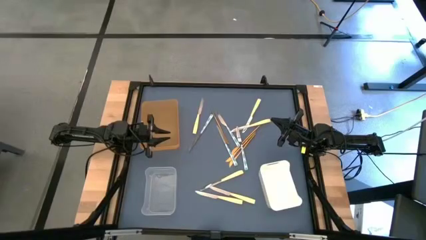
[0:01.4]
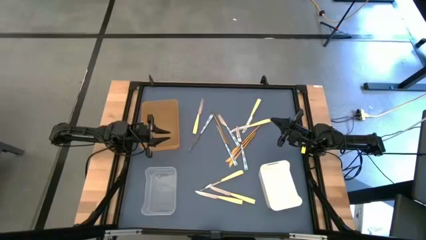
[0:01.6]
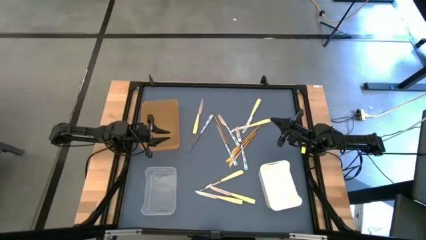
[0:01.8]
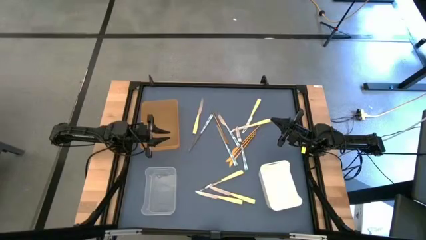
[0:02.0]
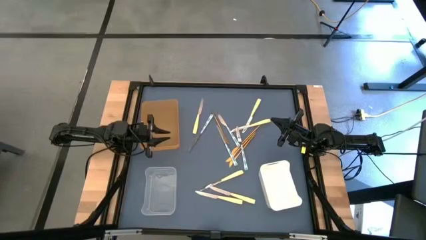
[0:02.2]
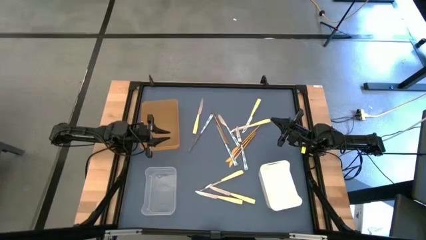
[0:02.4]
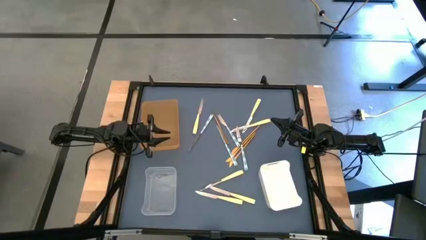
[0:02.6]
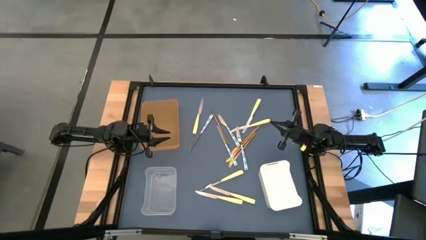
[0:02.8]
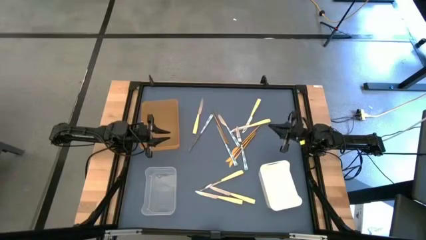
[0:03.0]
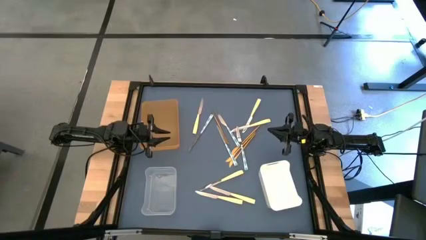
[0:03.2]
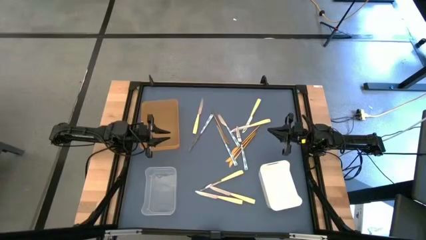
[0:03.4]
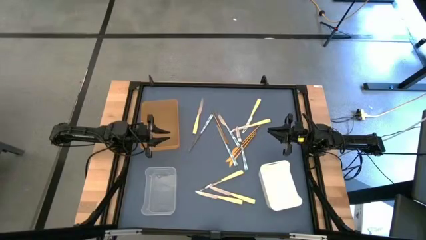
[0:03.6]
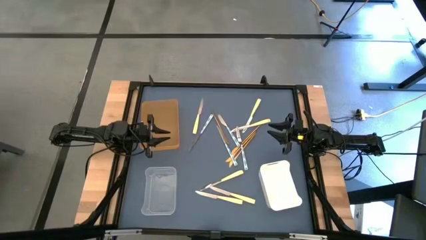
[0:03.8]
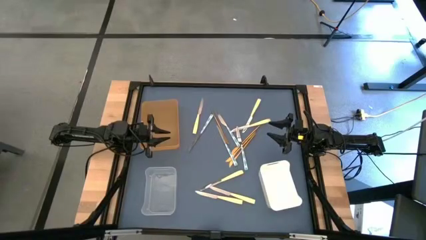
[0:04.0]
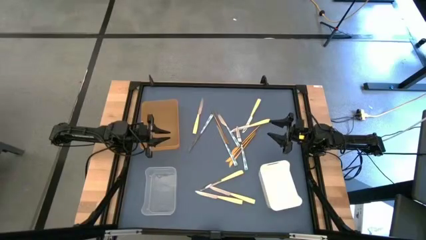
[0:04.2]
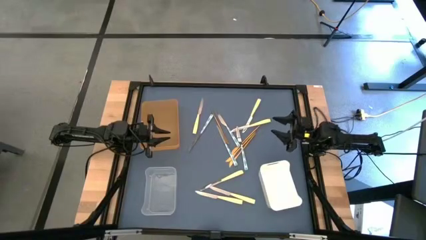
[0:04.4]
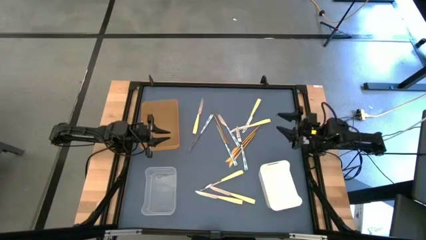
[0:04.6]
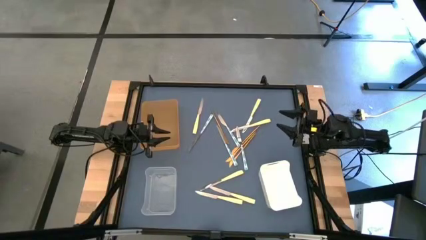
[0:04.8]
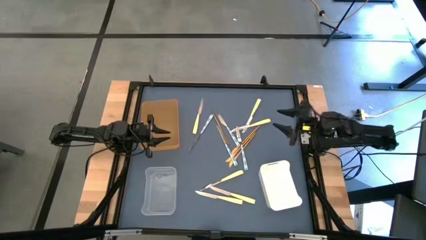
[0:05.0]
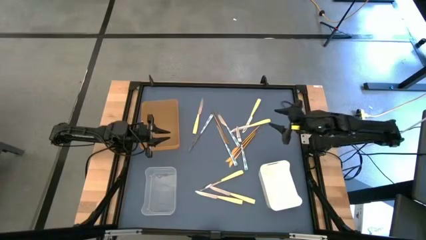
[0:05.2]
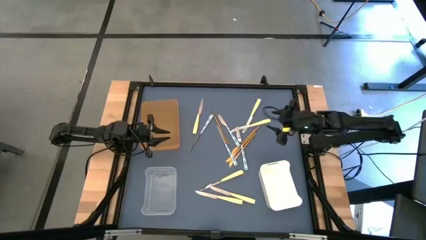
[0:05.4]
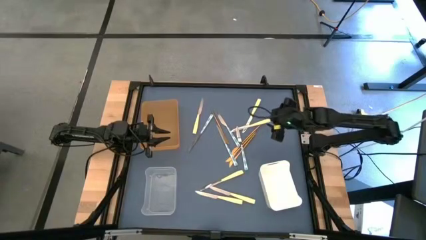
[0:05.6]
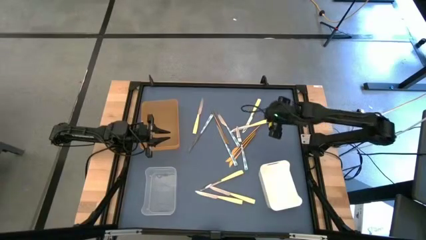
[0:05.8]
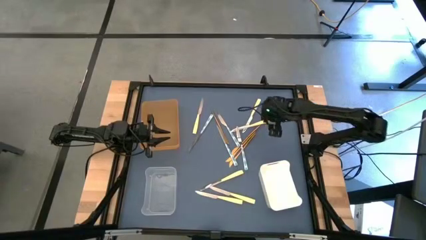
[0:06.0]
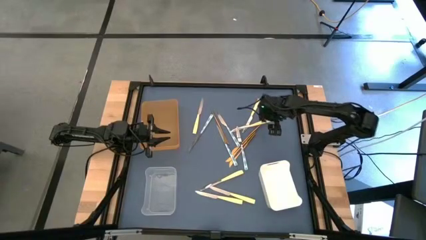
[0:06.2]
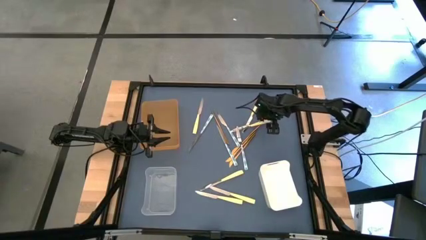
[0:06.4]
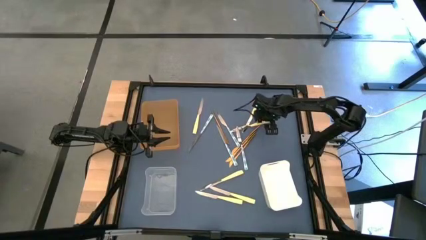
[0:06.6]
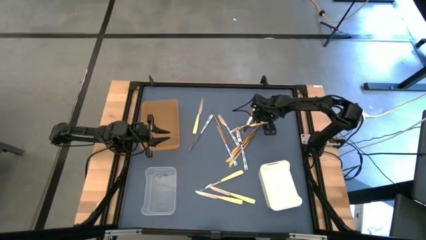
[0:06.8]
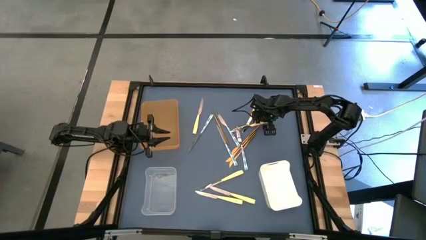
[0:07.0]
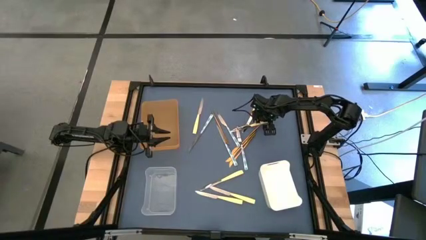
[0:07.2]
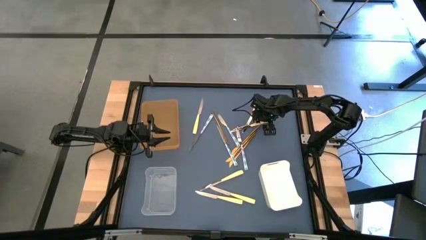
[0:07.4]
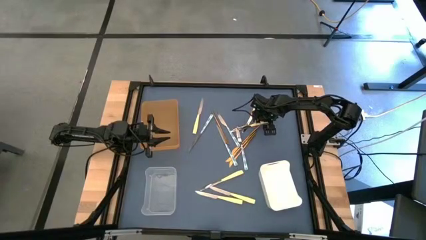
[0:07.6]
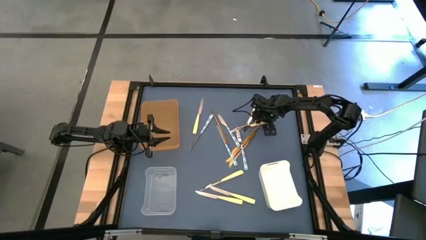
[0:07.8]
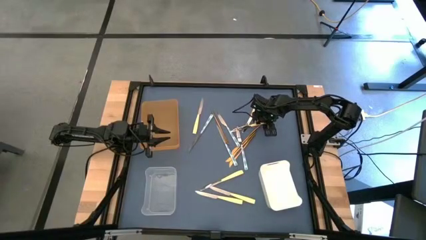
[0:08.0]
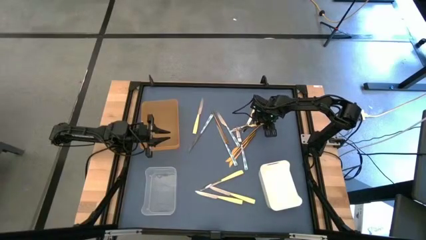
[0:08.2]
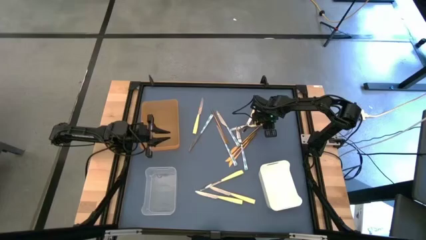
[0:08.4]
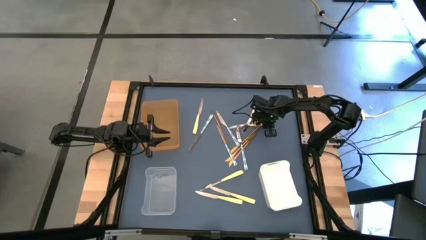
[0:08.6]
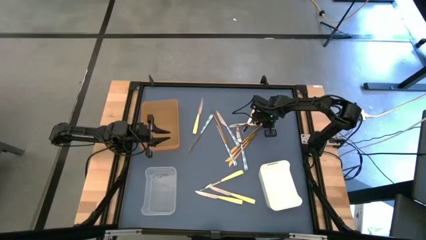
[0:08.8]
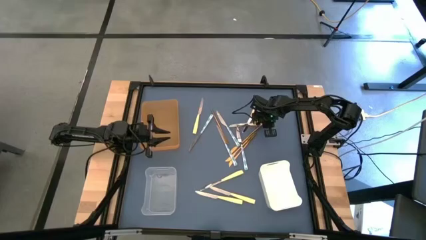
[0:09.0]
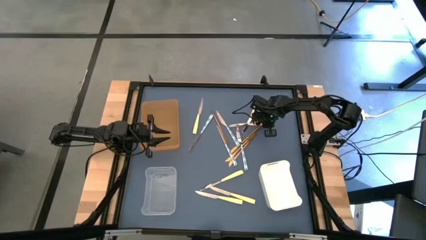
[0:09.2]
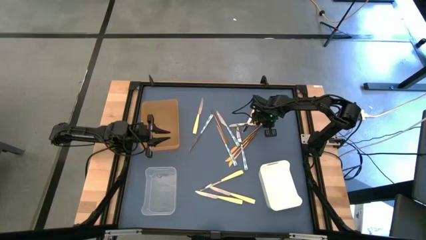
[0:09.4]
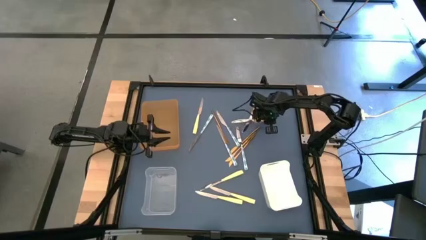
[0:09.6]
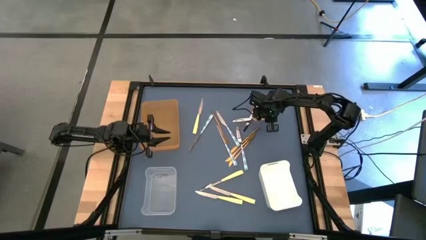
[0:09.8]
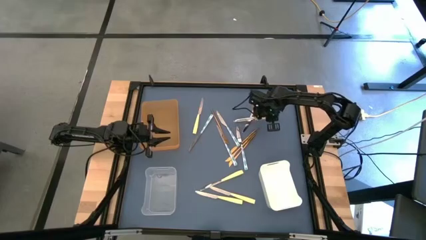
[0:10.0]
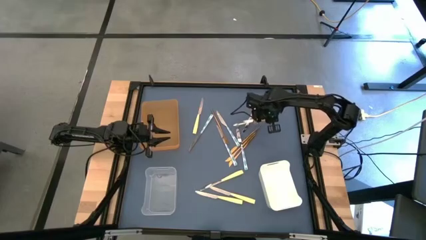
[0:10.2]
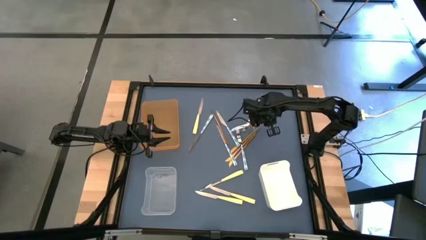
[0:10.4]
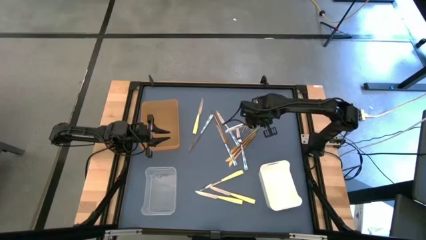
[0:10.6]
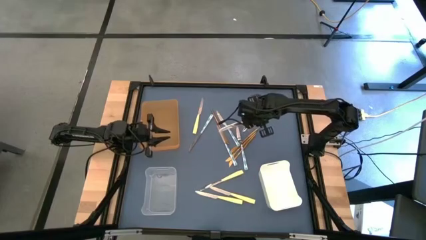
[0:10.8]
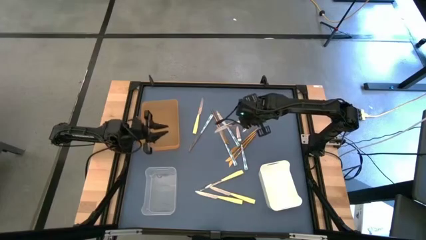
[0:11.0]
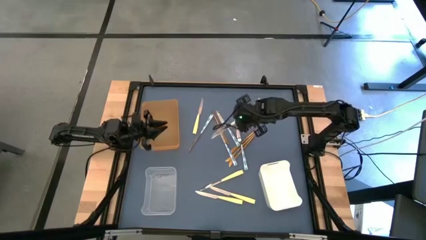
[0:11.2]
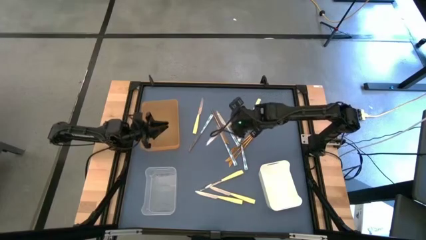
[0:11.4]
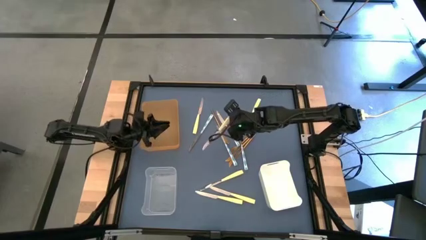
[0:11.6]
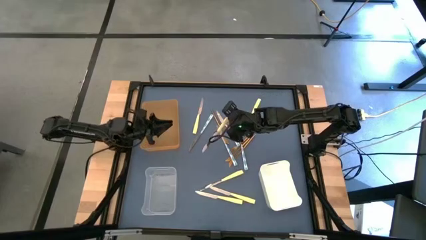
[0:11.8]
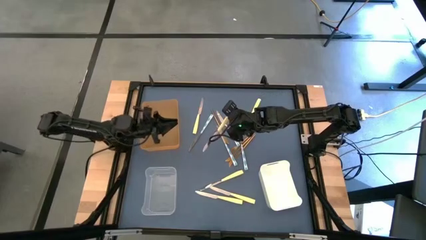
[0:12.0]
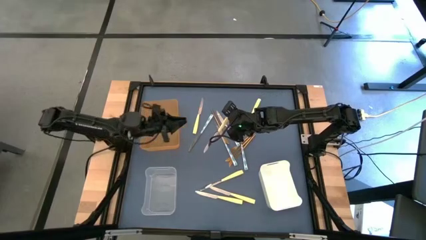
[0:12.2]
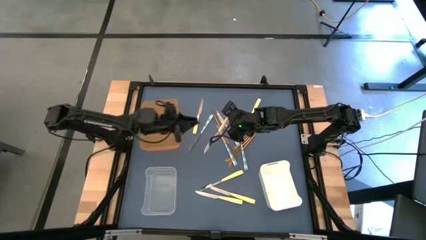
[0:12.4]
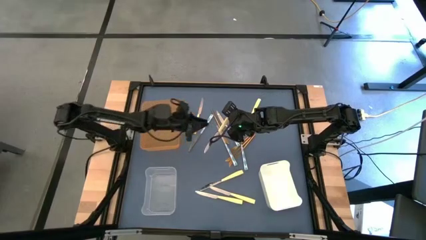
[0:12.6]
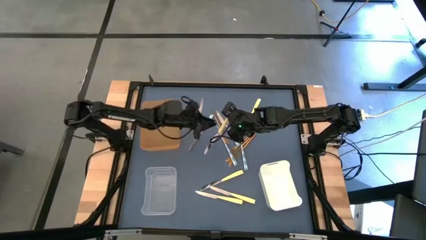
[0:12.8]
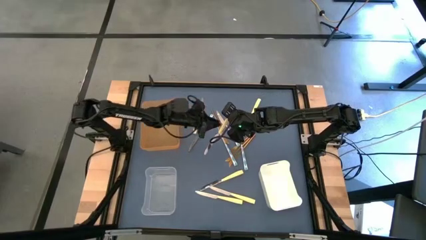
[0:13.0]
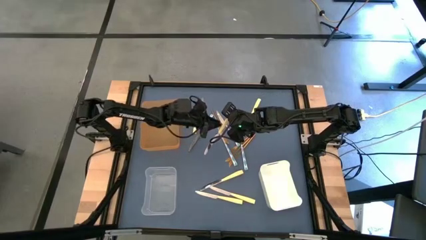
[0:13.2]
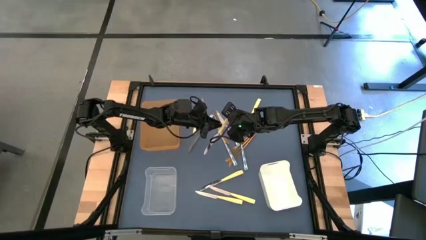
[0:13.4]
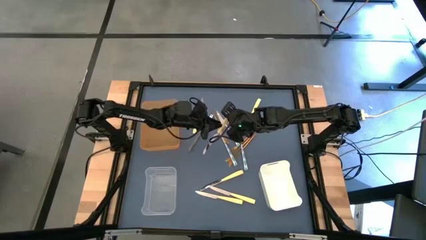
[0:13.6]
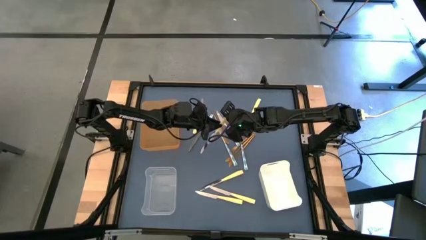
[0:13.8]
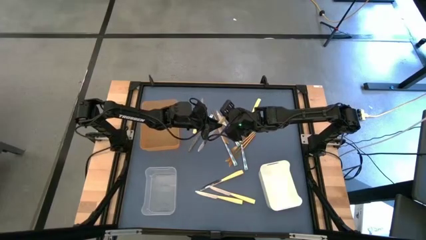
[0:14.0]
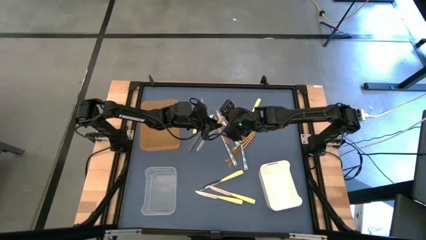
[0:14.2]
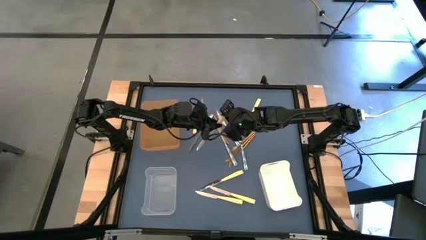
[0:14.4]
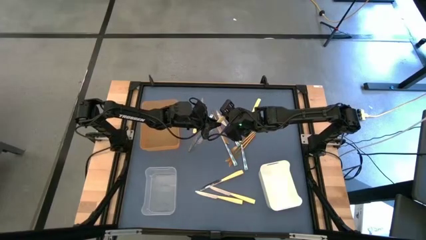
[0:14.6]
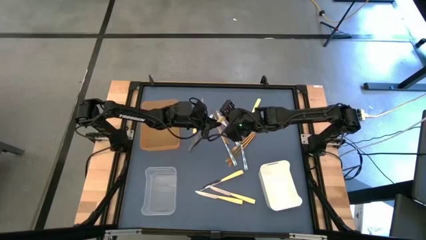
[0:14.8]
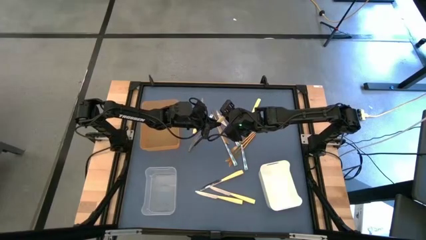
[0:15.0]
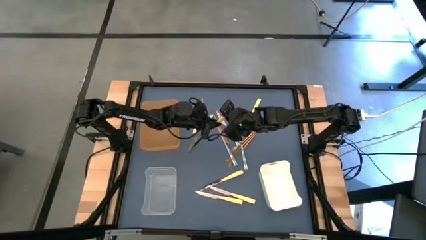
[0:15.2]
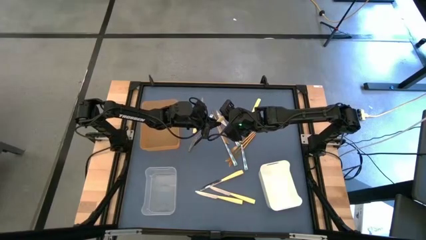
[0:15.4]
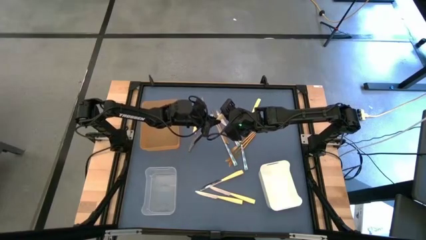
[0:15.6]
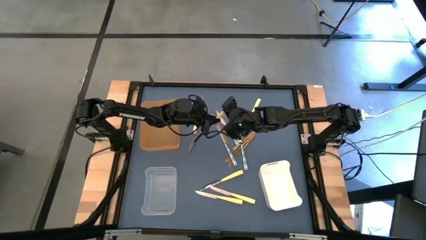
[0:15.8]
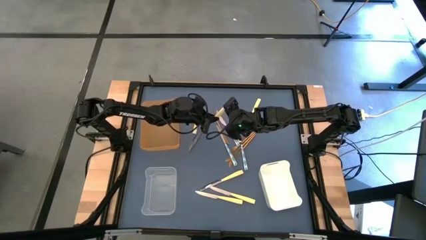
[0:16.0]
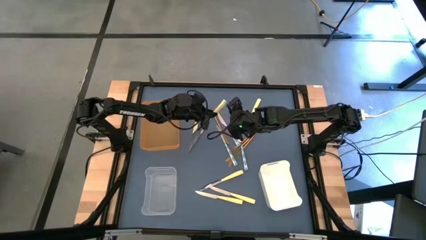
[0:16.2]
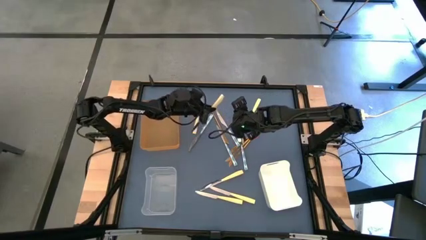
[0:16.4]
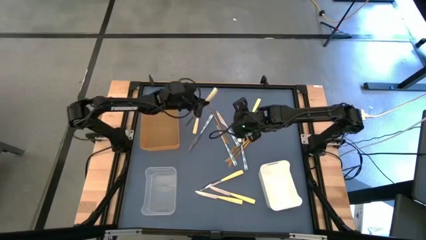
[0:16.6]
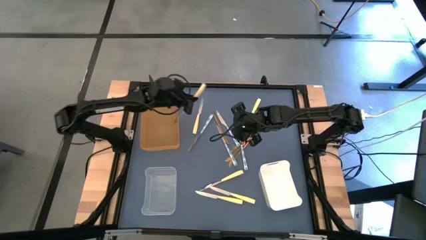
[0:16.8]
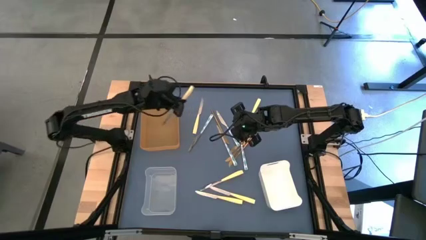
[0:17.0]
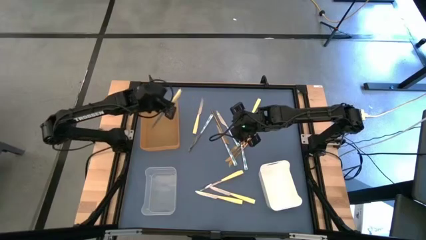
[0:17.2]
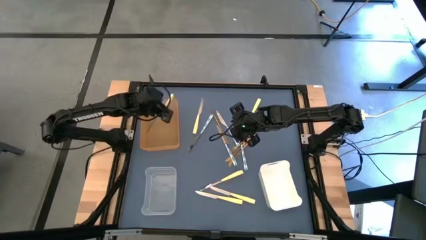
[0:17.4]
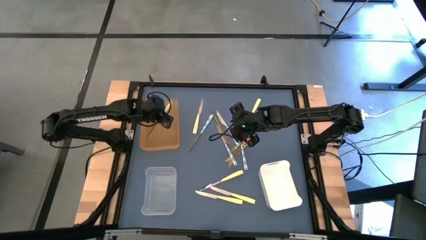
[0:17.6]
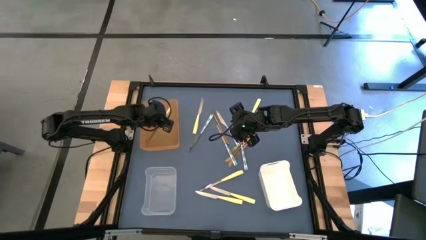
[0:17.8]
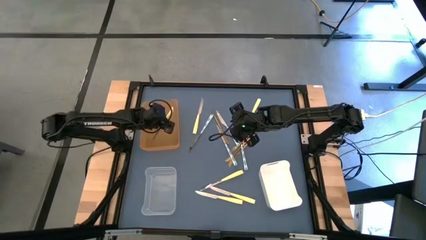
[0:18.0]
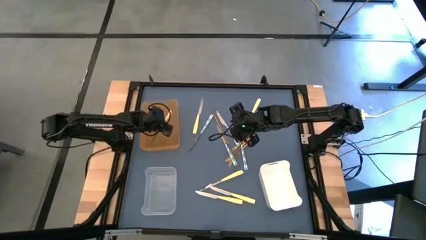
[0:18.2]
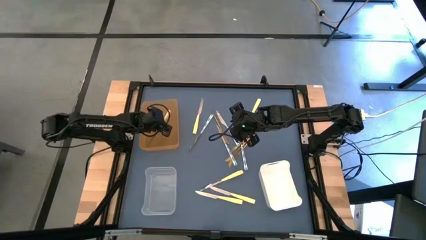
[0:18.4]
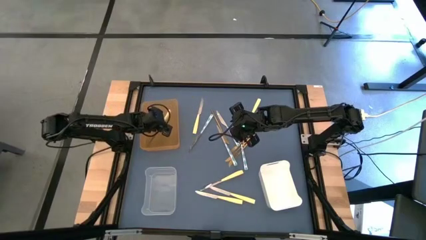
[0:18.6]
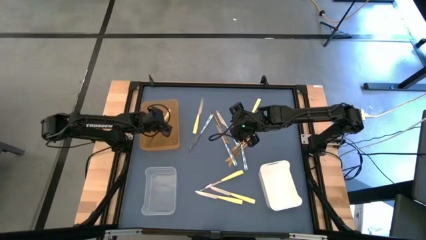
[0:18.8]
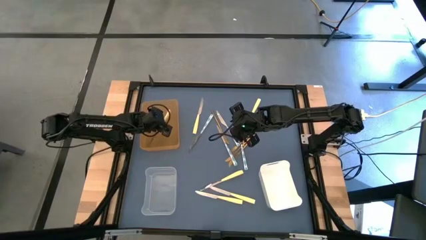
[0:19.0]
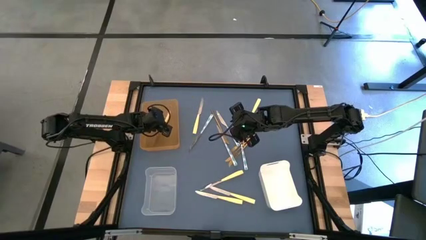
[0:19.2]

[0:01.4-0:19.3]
Task: Sort silverware by color (type)
Put the yellow knife into the orange bin
